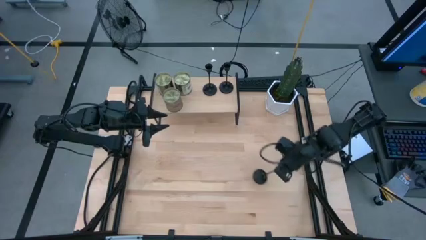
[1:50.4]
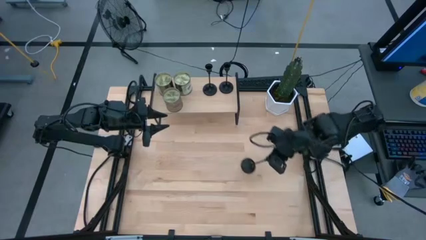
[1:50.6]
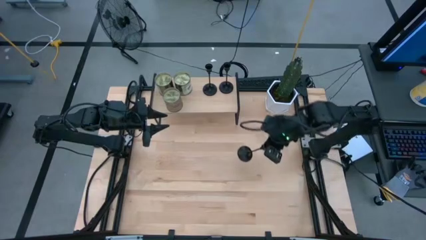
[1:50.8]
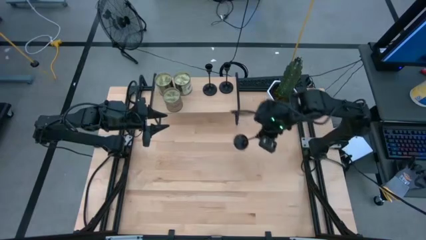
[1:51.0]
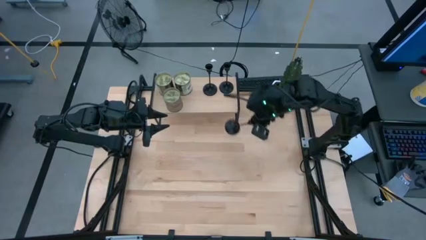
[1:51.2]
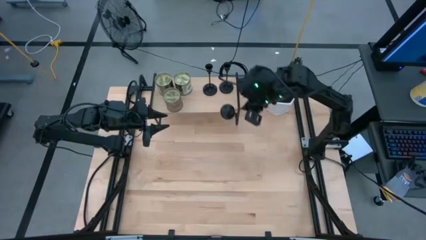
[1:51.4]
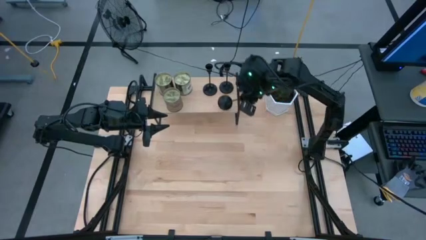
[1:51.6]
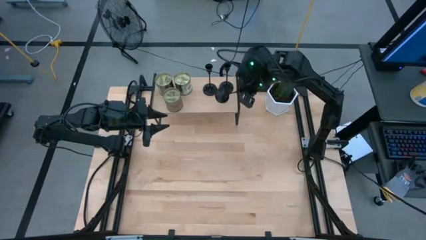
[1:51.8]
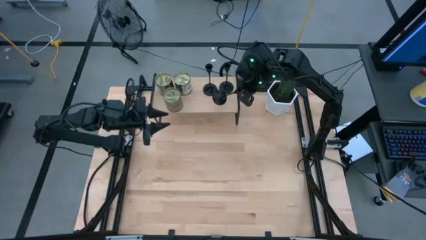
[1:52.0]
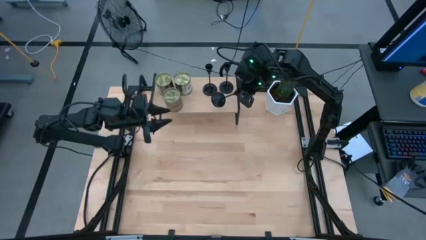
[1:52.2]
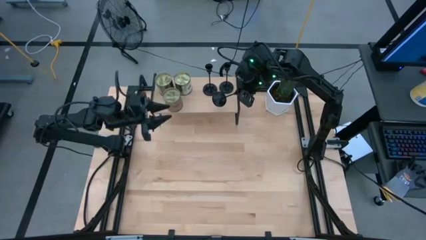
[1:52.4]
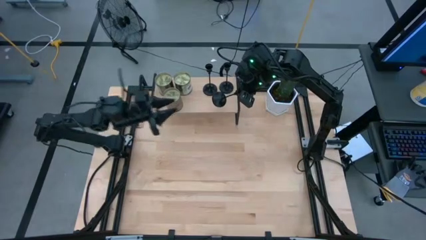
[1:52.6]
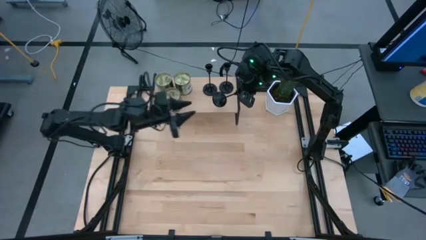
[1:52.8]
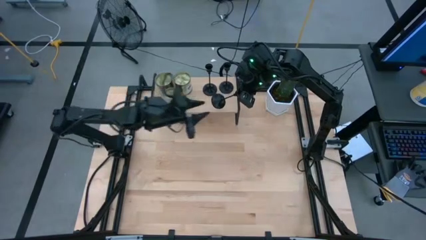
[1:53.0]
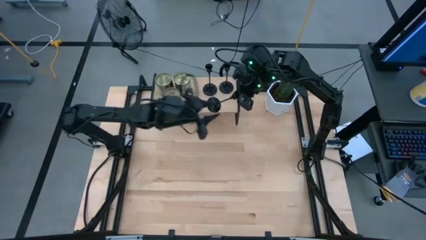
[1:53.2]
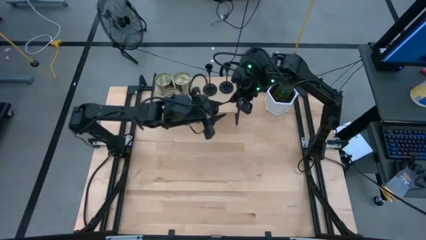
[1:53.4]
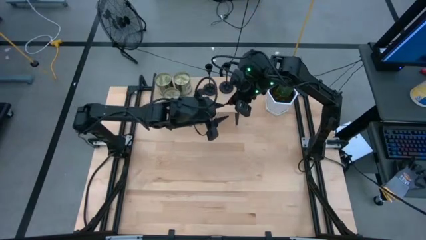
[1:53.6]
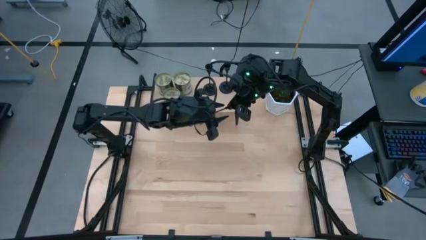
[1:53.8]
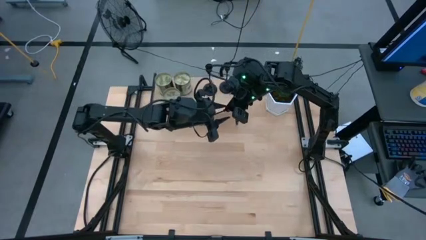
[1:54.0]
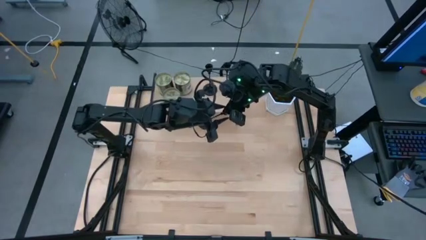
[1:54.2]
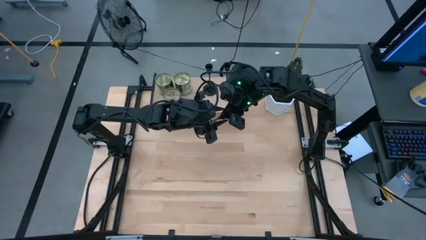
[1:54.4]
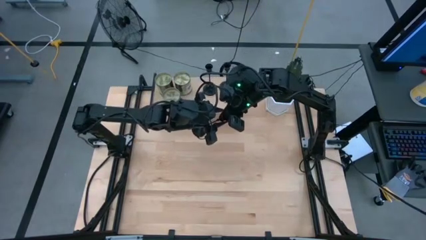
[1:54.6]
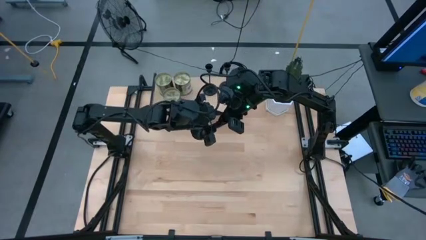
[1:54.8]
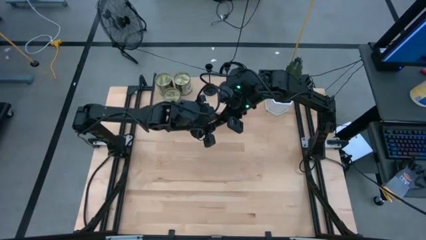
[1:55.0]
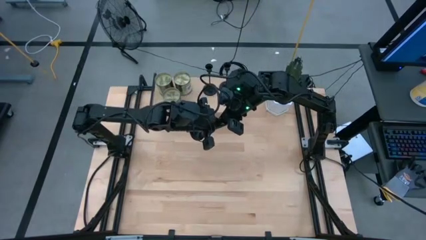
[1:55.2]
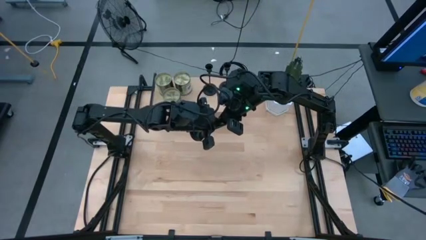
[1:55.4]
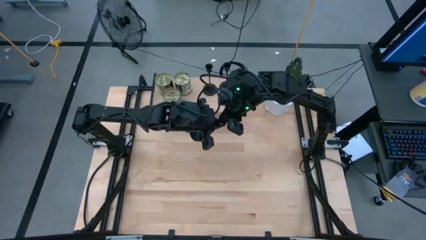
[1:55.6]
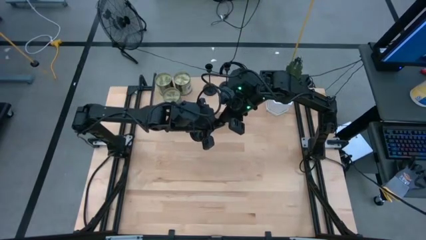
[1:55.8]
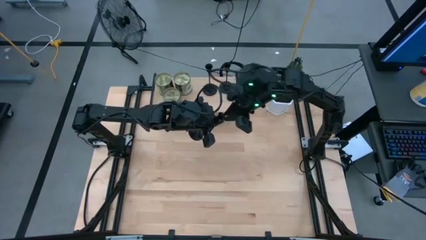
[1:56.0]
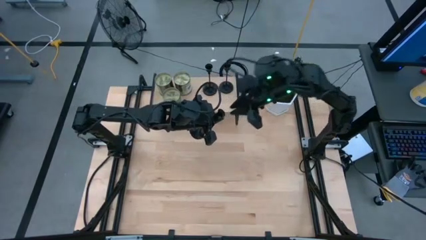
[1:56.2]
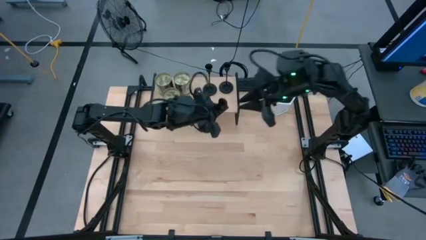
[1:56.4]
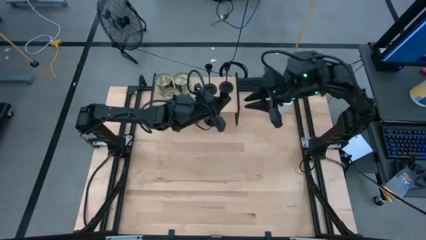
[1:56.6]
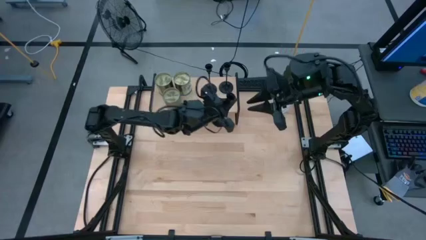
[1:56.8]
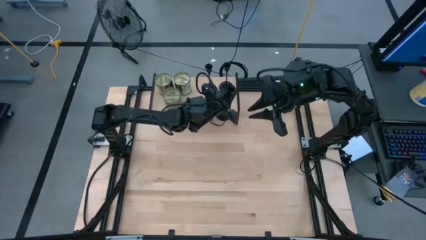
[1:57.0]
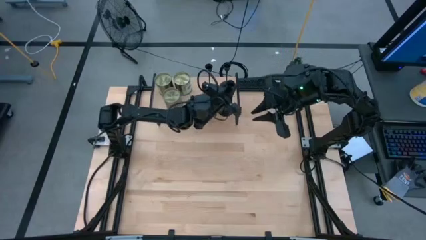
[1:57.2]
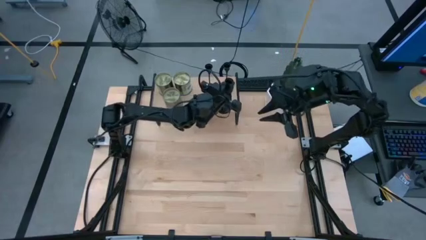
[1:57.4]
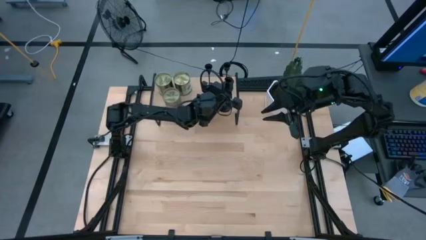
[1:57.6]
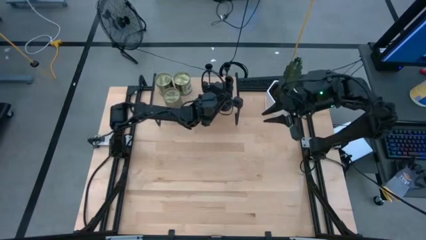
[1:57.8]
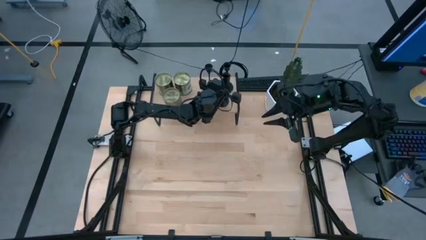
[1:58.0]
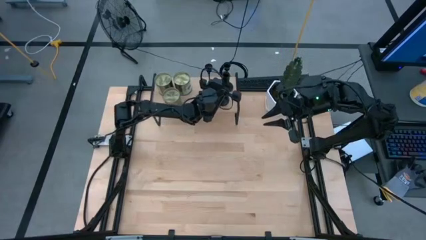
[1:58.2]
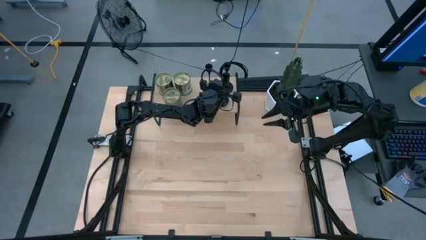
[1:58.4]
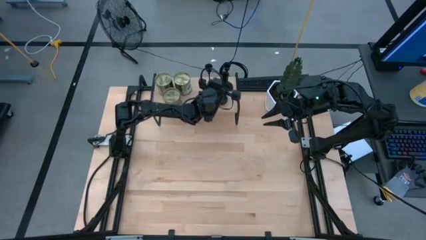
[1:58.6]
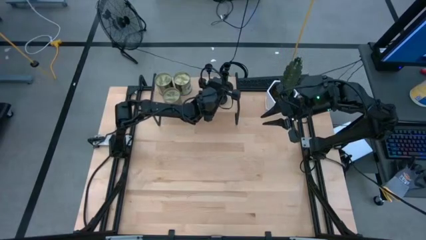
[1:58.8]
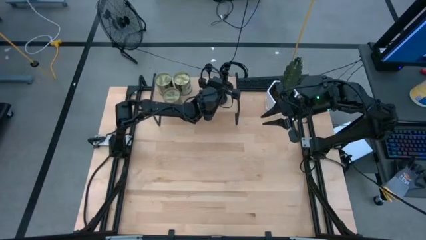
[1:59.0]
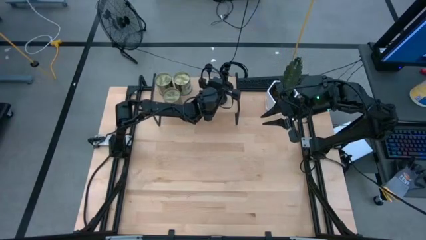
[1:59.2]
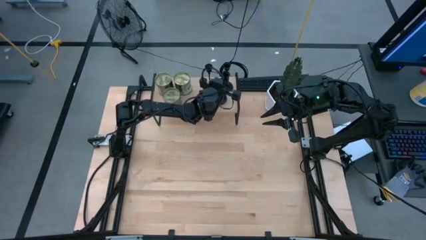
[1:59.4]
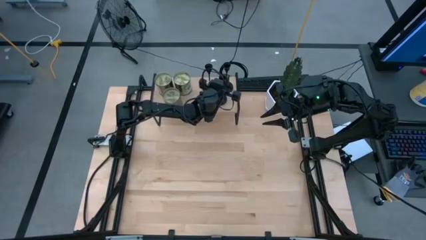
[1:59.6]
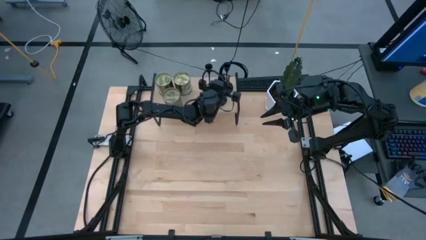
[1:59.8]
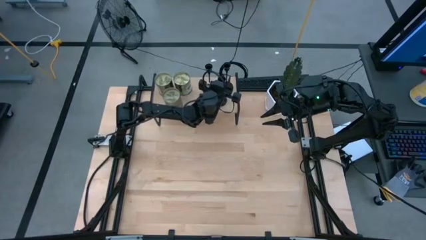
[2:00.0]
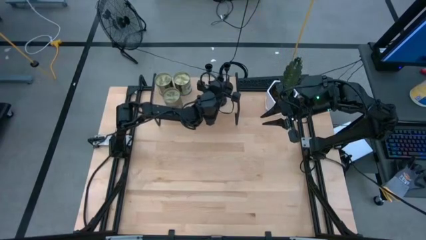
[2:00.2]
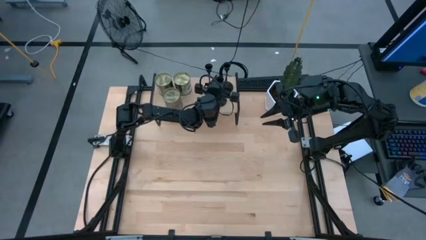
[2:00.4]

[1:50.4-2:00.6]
Task: Pick & Place candle stick holders
Put the black candle holder on the shelf

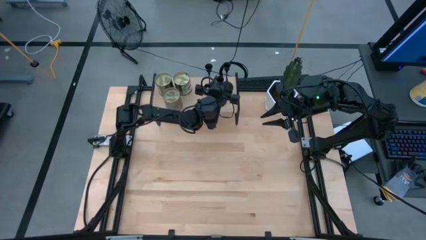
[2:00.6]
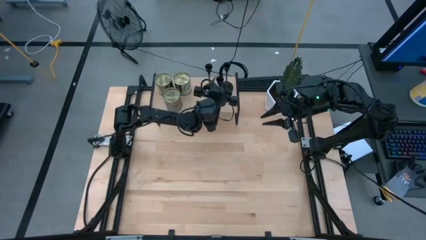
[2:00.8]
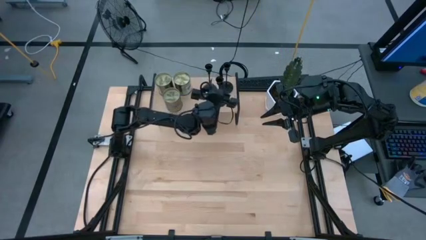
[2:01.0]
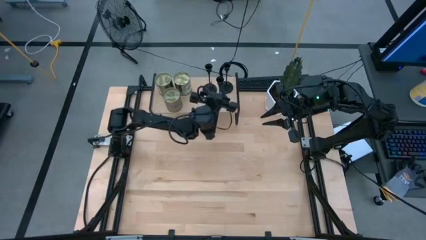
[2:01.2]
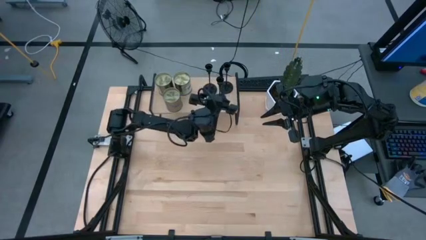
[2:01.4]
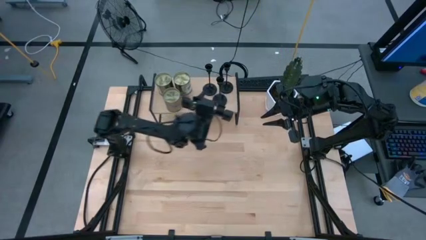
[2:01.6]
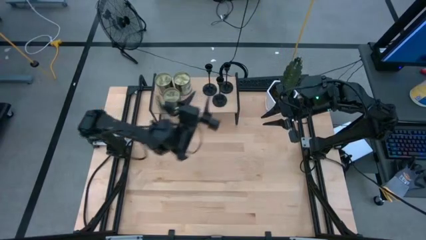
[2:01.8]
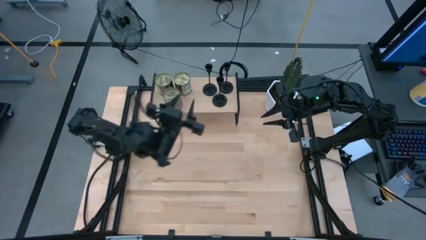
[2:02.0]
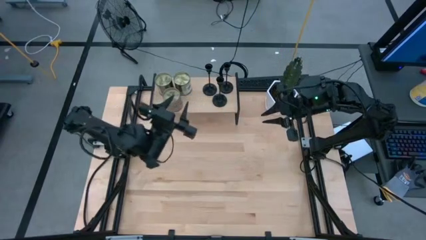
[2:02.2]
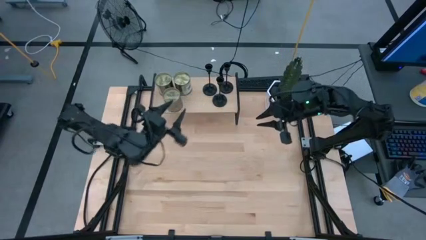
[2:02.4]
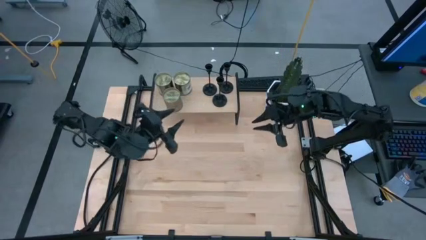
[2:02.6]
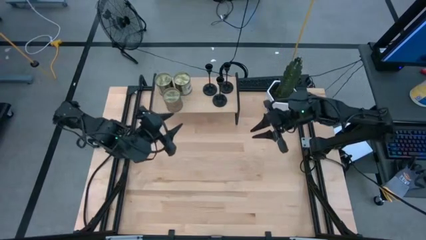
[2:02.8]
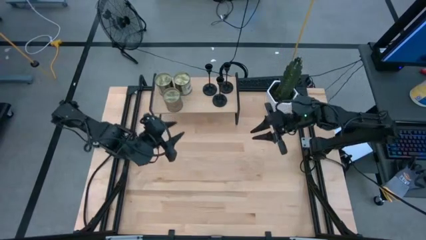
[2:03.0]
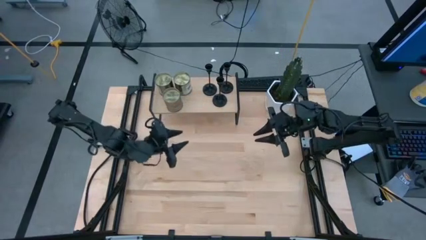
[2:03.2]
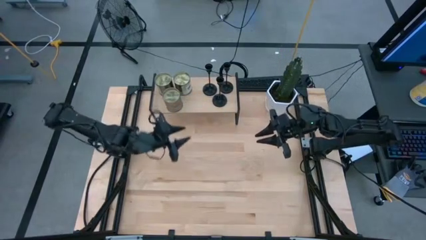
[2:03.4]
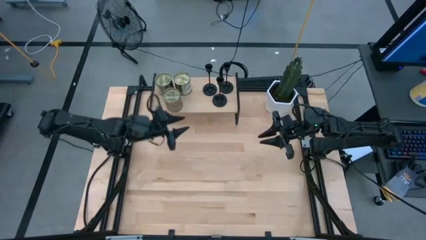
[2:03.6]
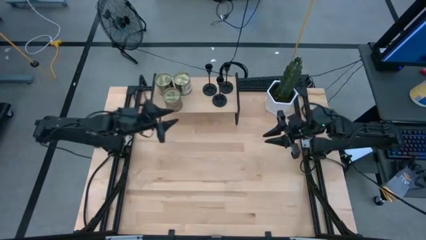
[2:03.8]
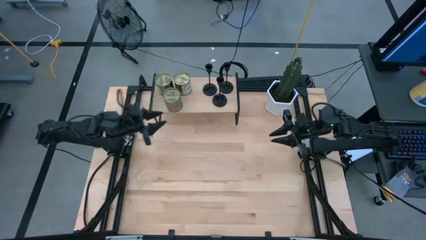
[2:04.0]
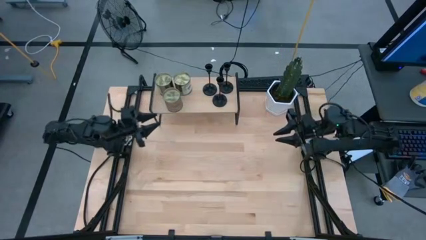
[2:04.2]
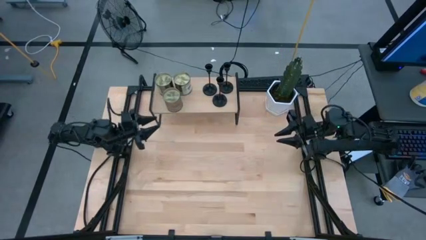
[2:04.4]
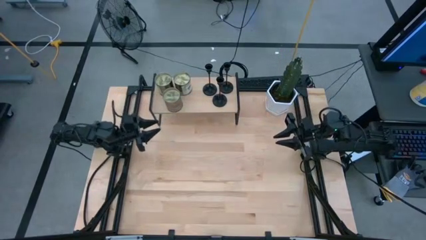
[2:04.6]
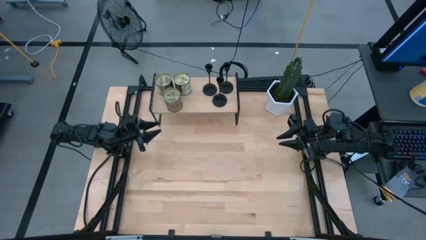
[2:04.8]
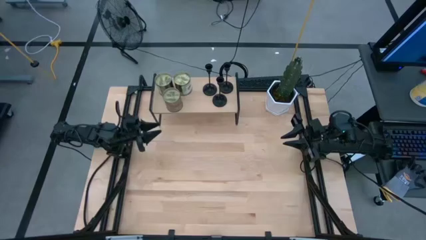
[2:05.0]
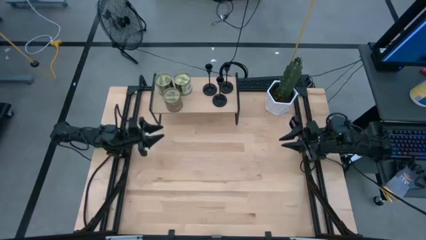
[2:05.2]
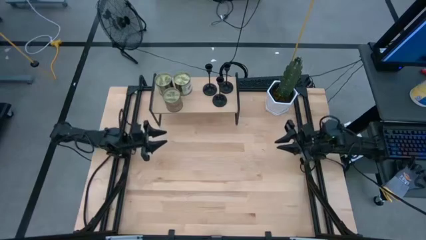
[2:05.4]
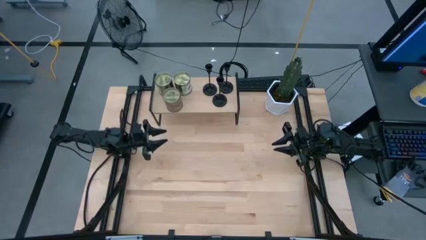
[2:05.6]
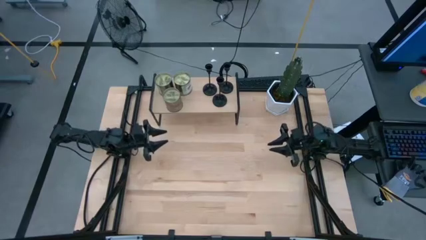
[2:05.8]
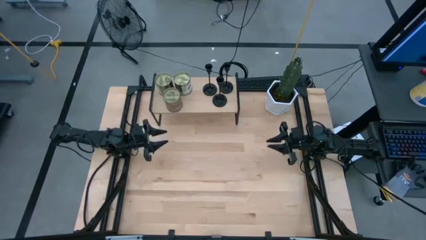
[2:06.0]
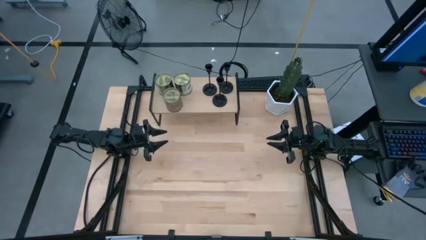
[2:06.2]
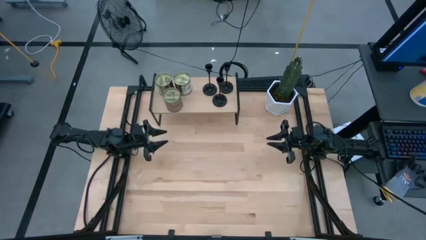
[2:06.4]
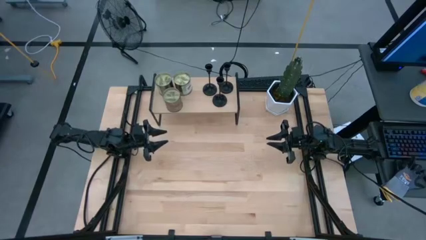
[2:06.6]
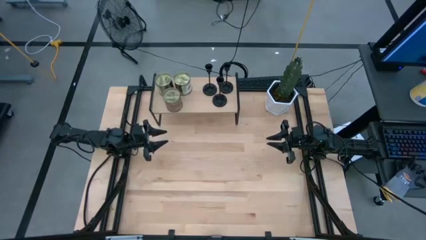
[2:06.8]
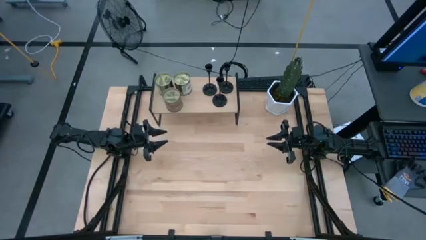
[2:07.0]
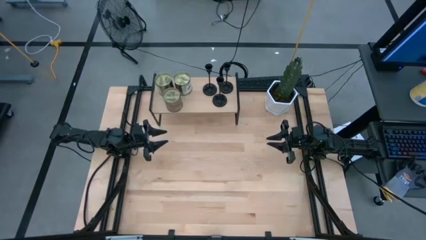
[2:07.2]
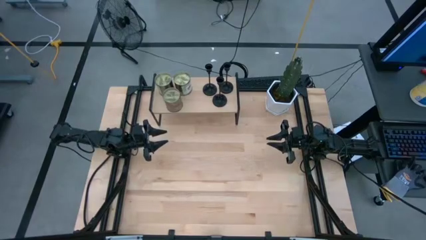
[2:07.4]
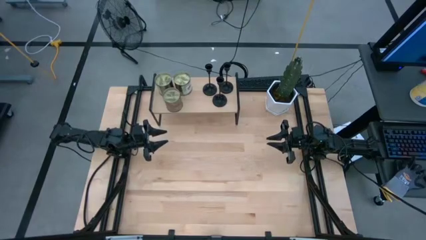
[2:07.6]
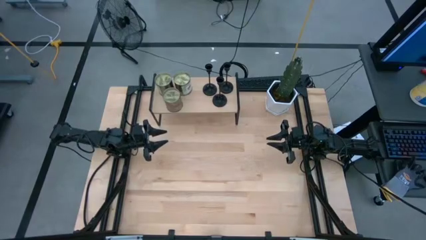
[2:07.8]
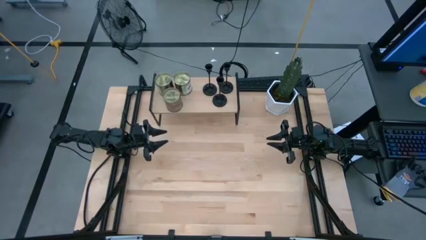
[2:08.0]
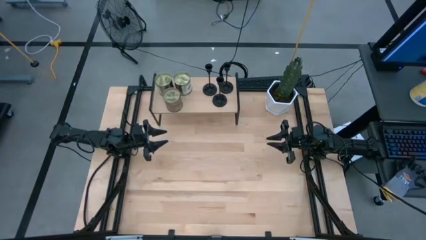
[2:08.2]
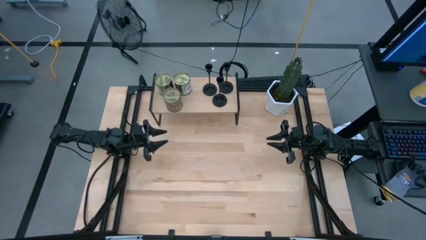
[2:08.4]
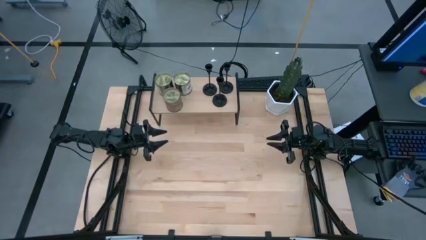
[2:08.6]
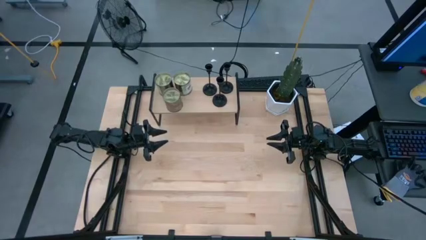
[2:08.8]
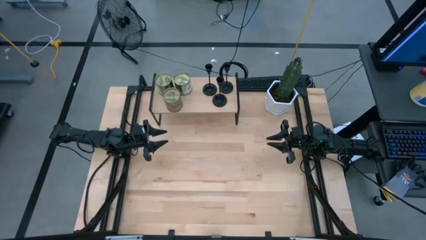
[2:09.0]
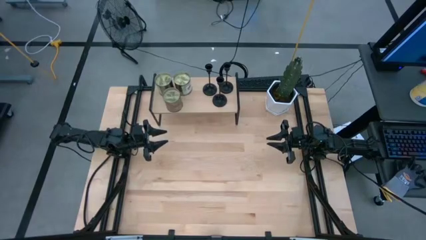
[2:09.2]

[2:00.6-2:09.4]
Return to Home Position
